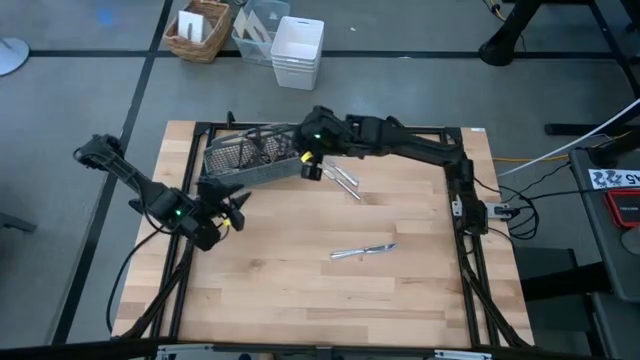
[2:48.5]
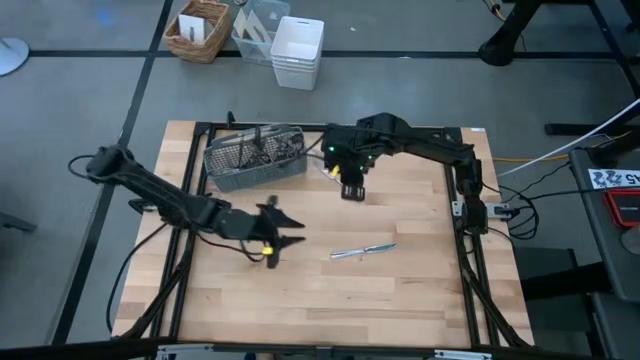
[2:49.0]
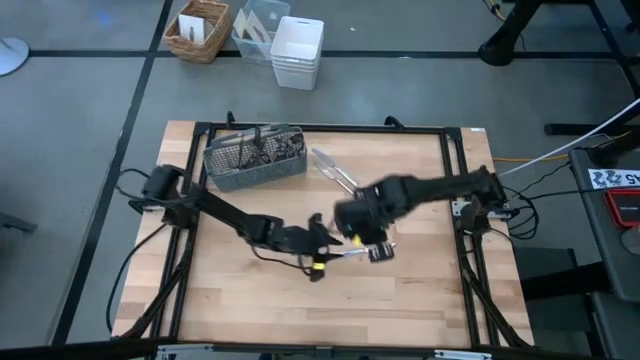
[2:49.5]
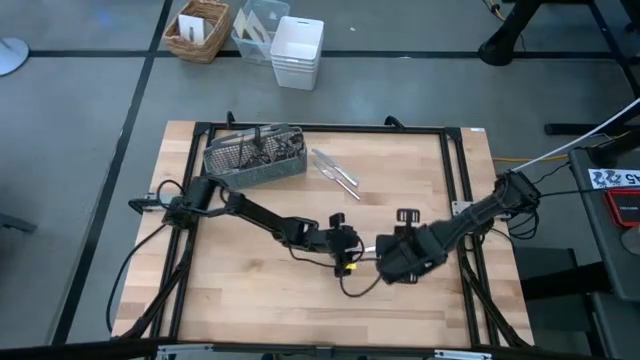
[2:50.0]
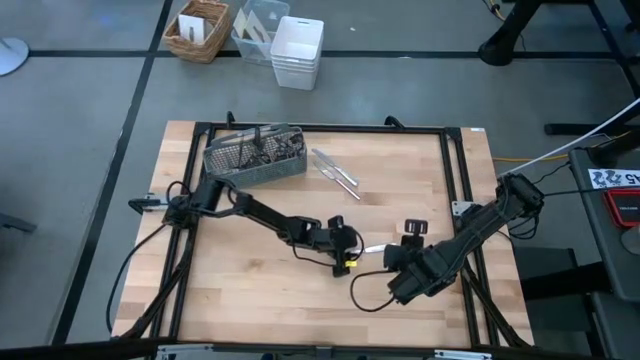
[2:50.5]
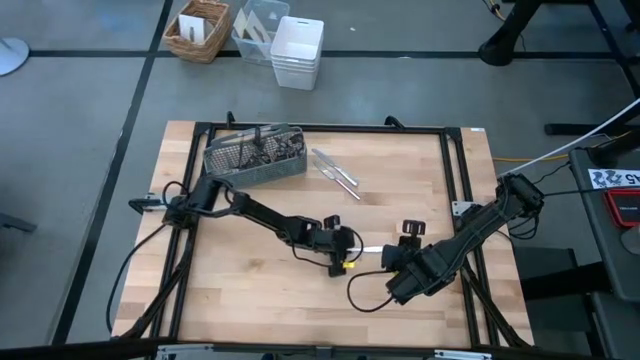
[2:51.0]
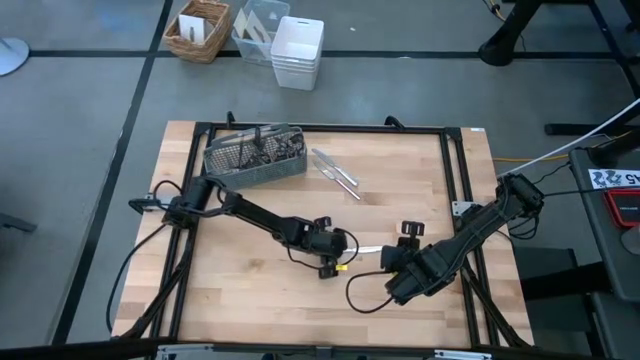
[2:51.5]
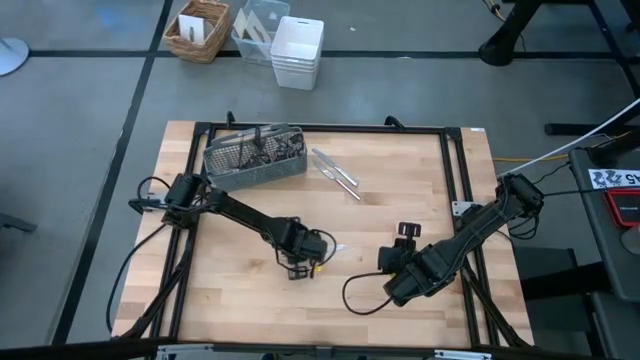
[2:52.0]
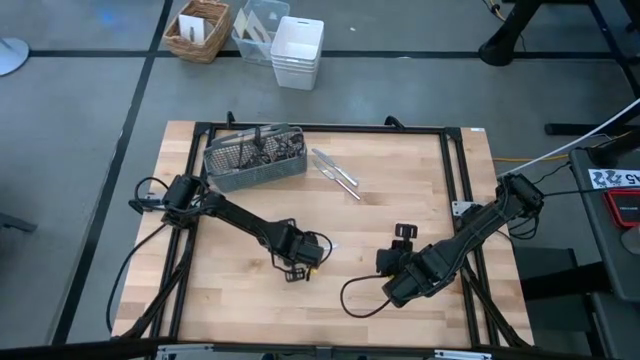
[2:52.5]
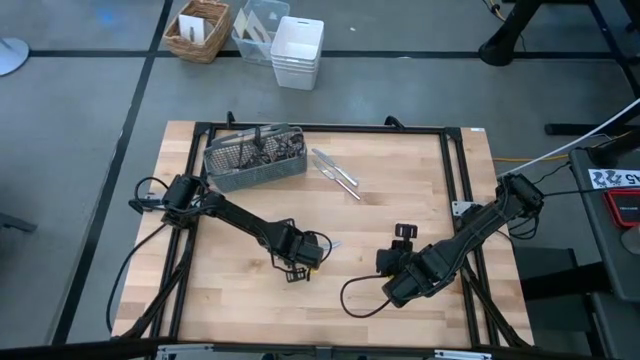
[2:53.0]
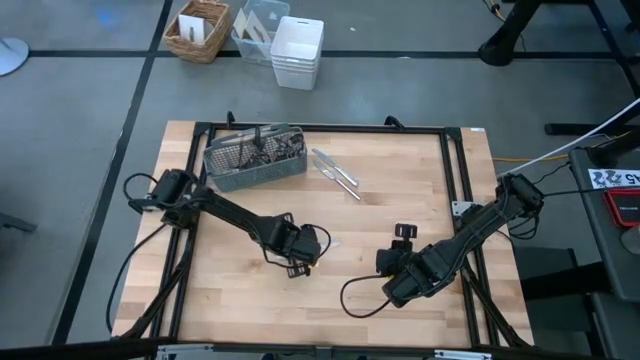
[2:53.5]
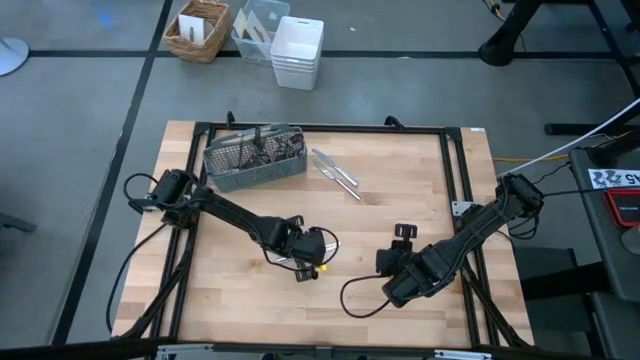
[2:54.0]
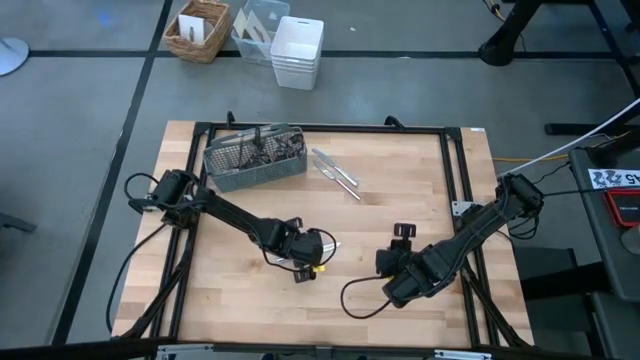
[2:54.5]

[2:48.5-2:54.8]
Task: Sort silverware
Put the silver table knife into the silverware rack

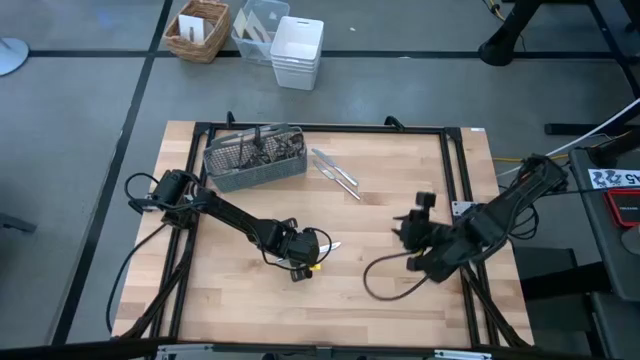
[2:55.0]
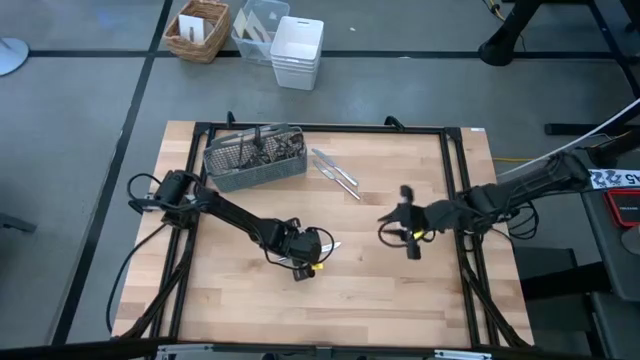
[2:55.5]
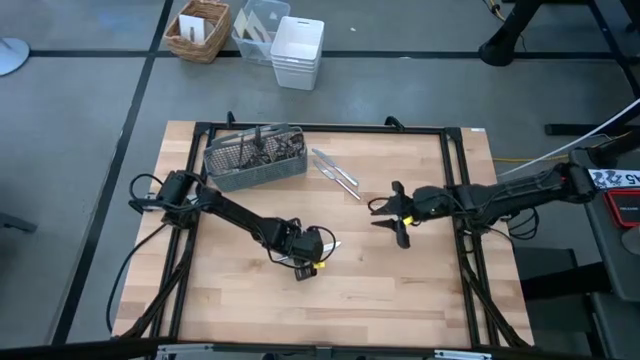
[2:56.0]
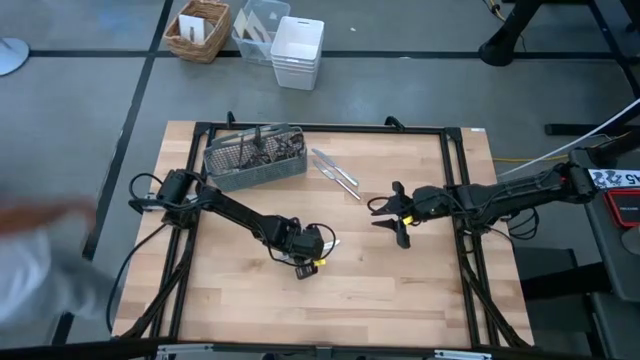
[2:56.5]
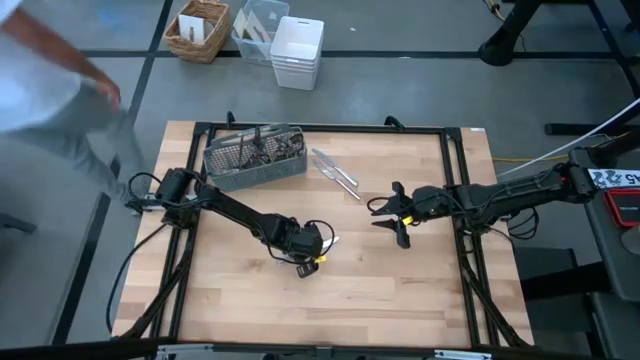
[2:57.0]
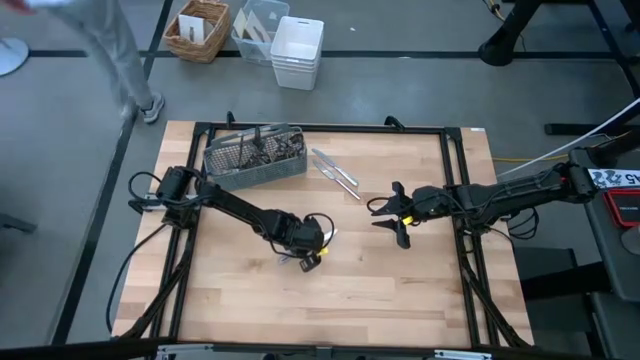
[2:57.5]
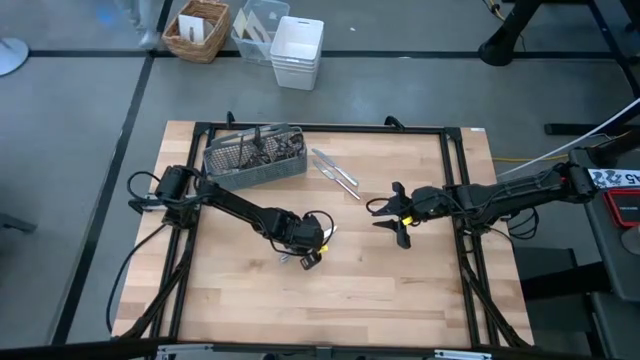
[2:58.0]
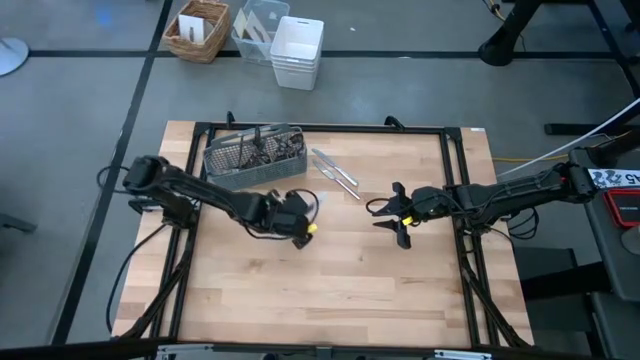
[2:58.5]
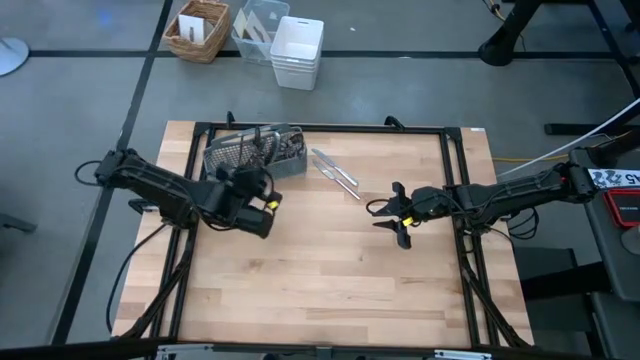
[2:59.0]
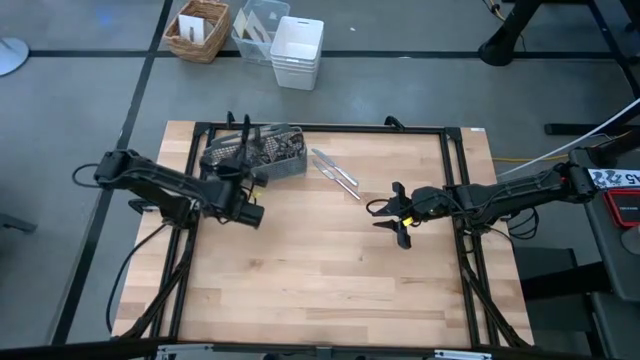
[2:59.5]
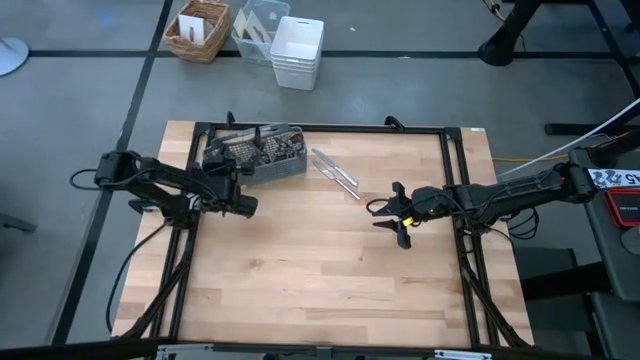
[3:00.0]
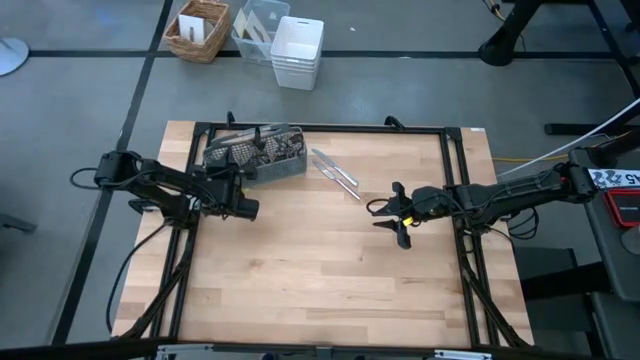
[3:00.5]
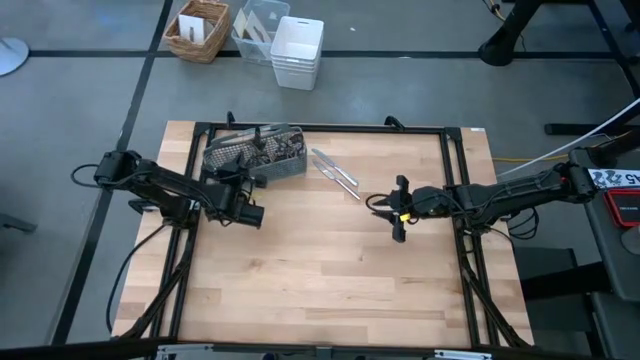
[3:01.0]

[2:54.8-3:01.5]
Put the silver table knife into the silverware rack

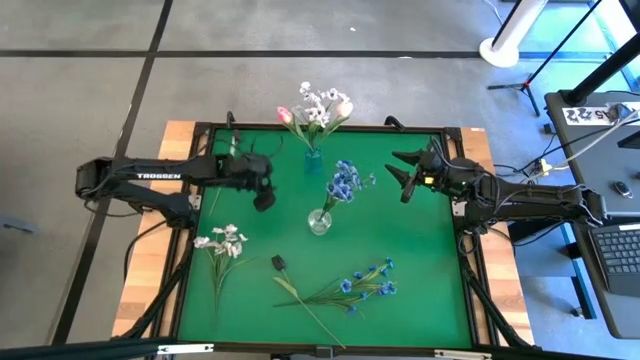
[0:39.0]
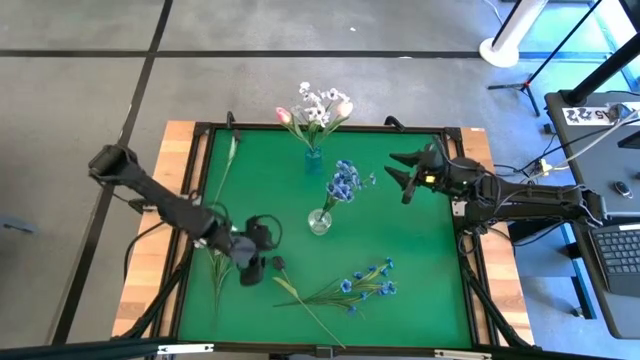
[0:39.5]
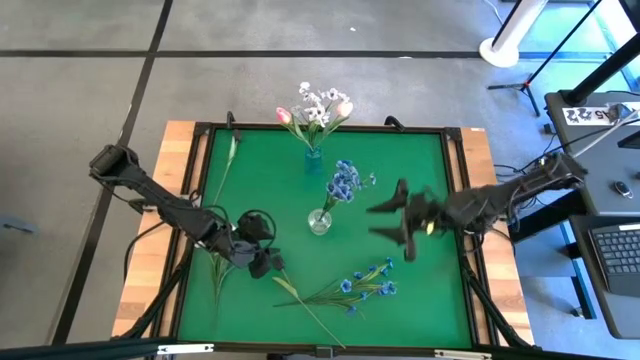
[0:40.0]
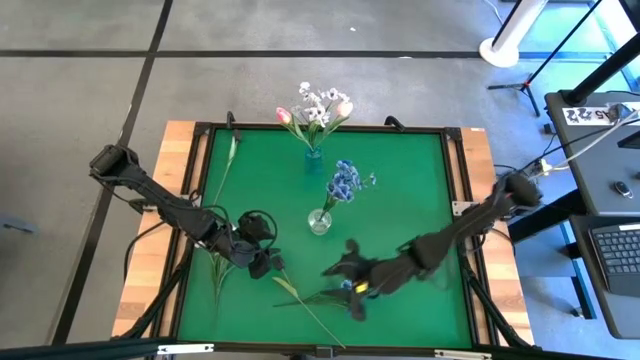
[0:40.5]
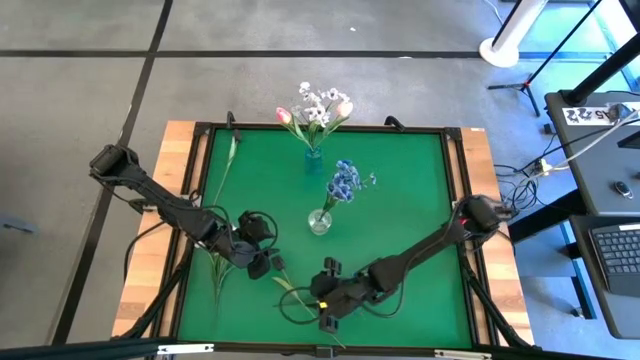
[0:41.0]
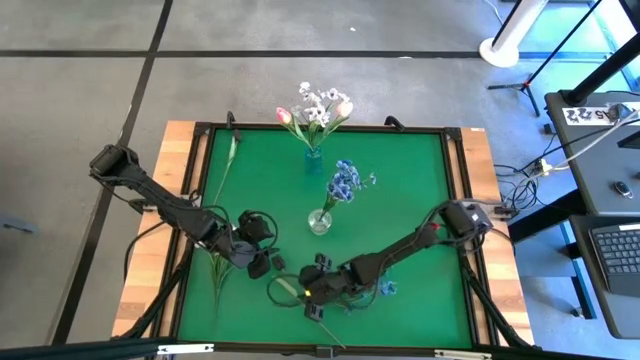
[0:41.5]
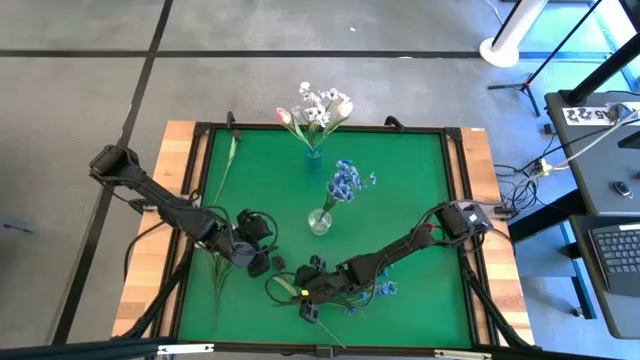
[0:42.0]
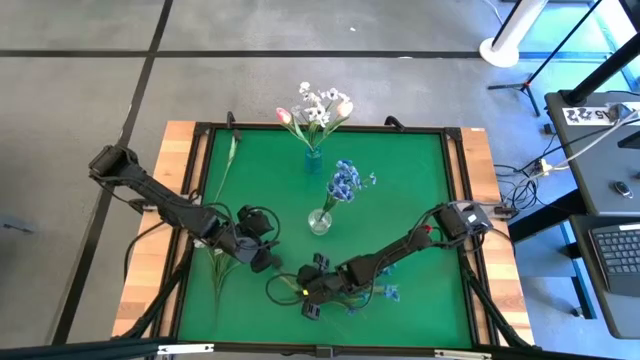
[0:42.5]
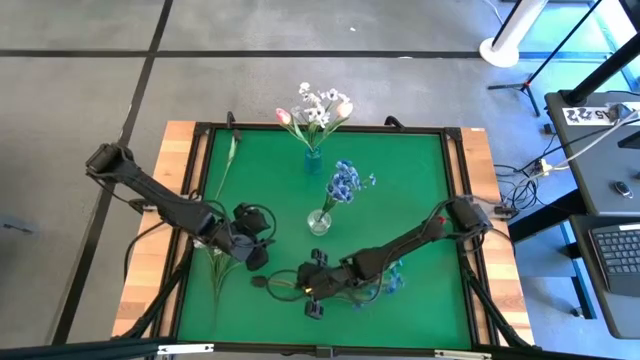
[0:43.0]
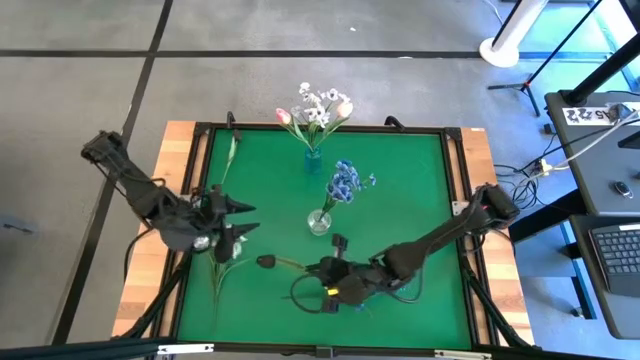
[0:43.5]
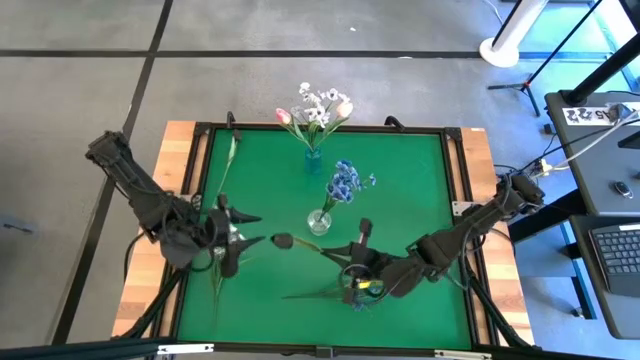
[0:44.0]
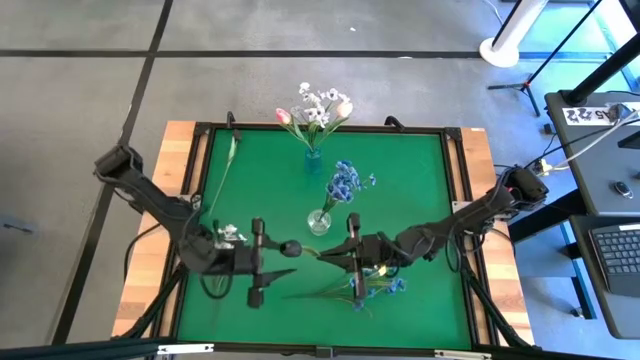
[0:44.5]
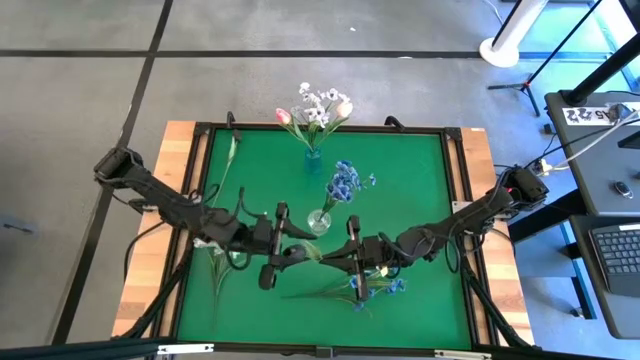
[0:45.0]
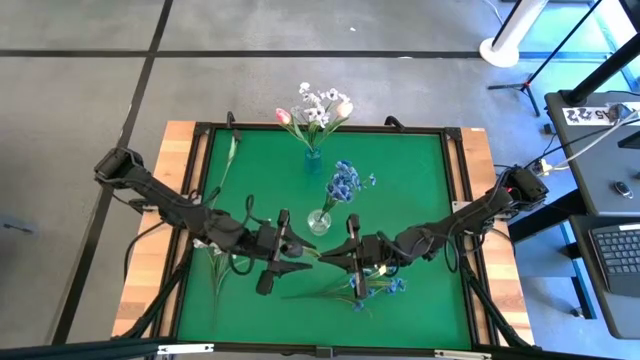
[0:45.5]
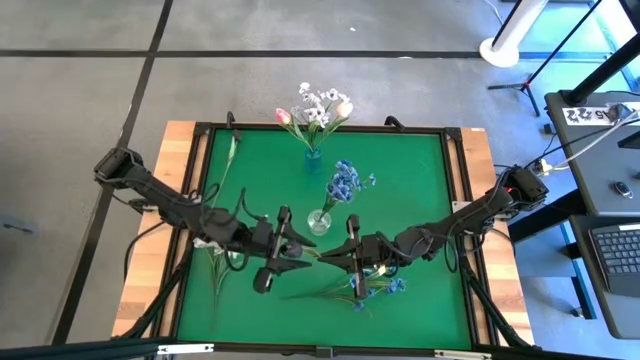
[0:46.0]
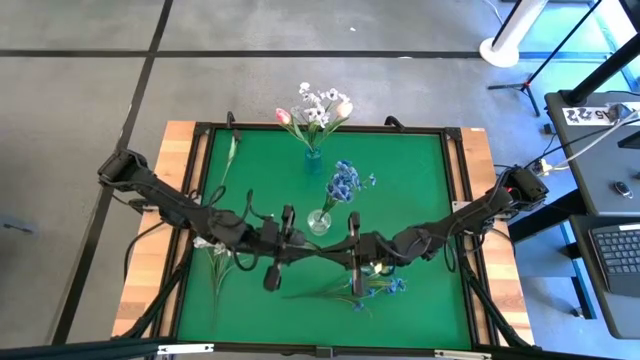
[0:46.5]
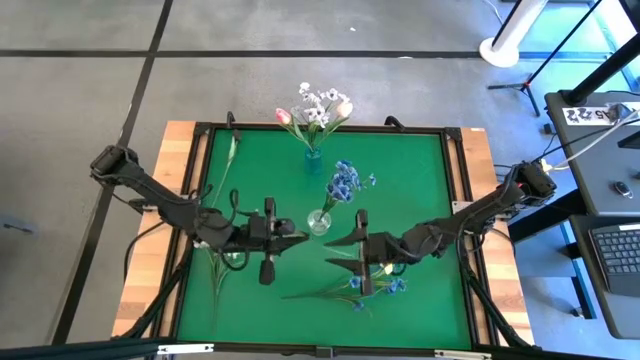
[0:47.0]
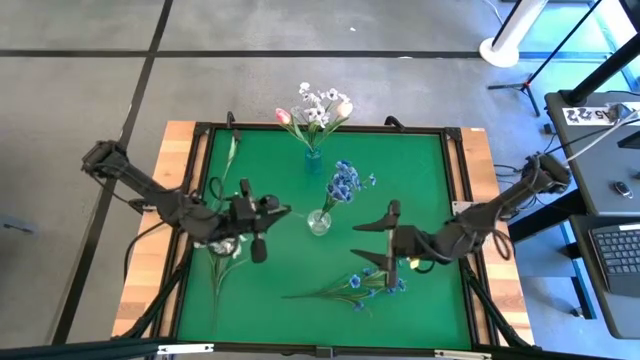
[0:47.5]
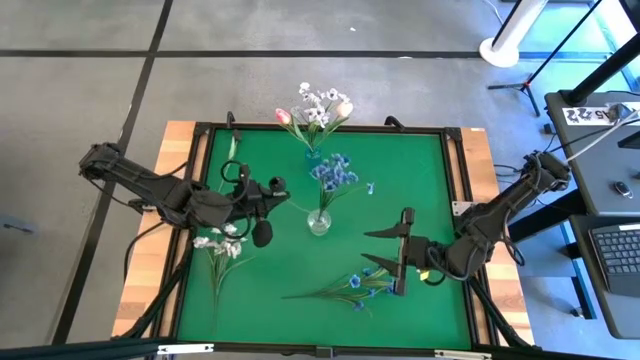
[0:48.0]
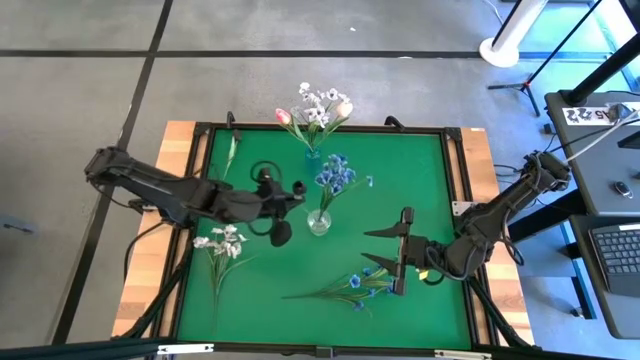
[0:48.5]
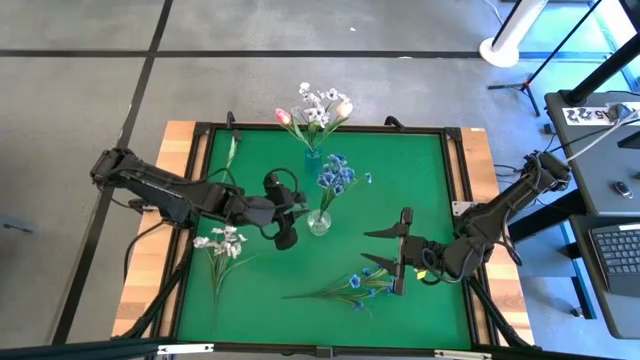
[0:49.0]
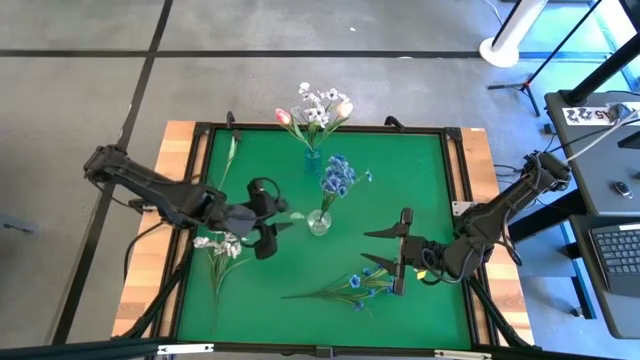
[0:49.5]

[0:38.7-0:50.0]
Task: Sort flowers into vase by color
Put the bottom black tulip into the transparent vase
